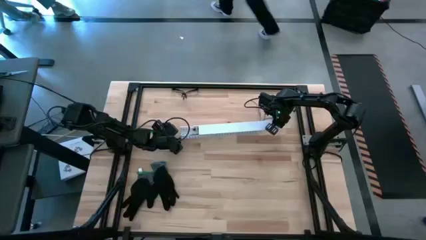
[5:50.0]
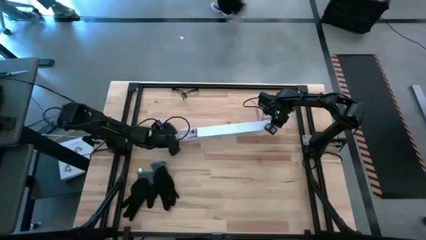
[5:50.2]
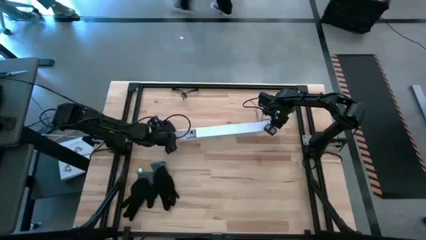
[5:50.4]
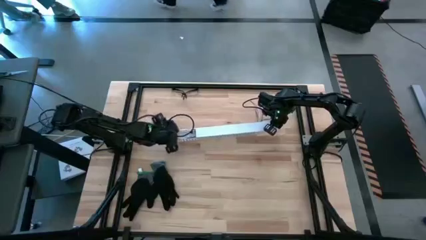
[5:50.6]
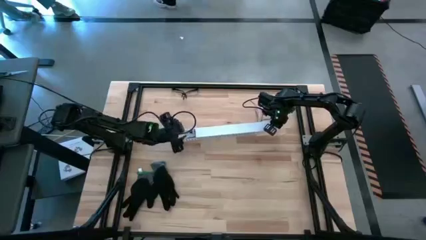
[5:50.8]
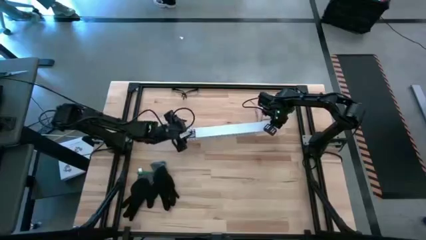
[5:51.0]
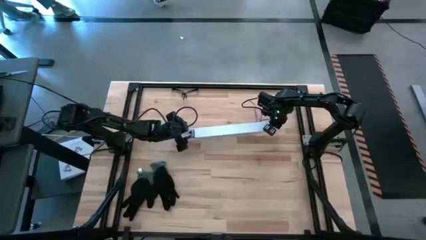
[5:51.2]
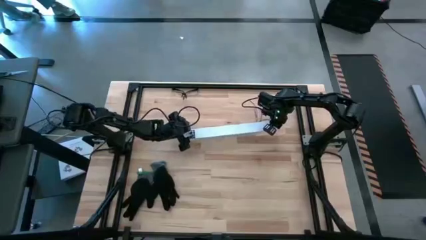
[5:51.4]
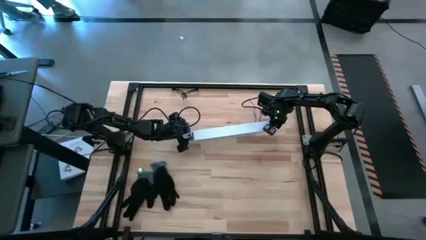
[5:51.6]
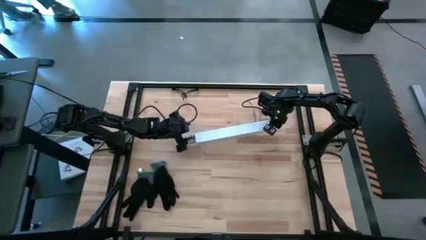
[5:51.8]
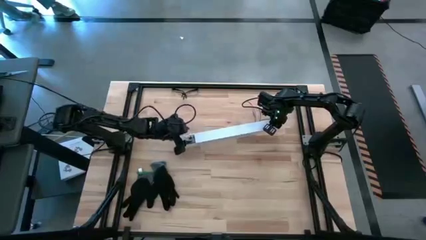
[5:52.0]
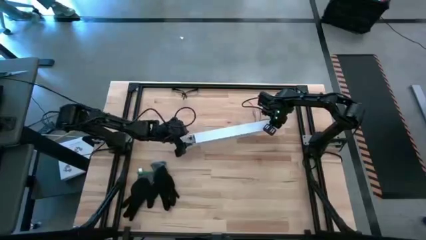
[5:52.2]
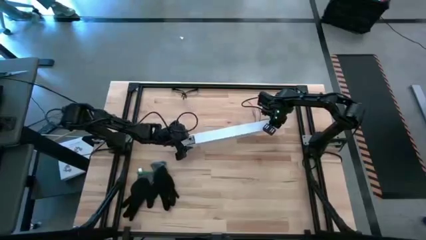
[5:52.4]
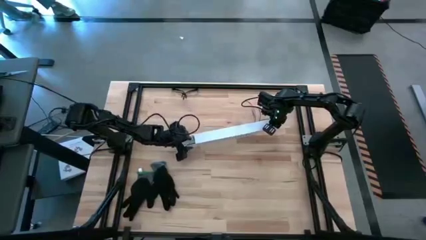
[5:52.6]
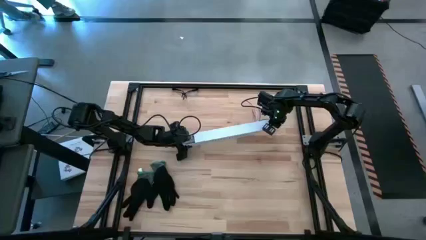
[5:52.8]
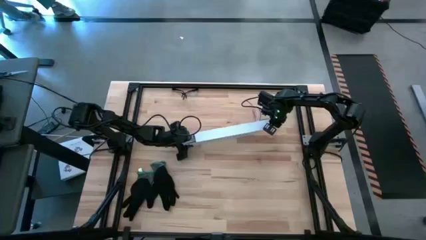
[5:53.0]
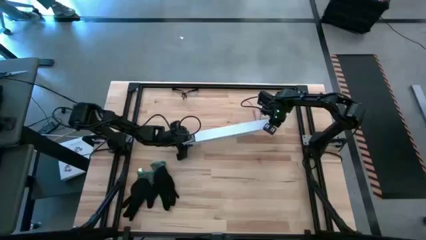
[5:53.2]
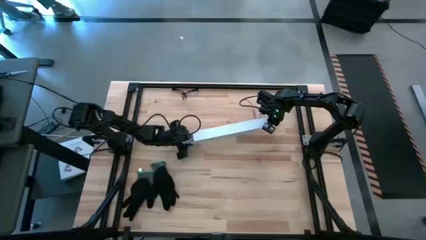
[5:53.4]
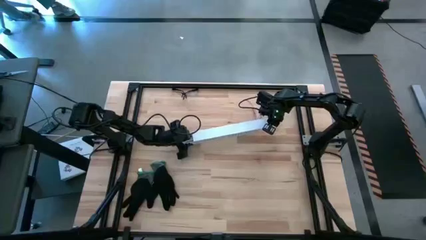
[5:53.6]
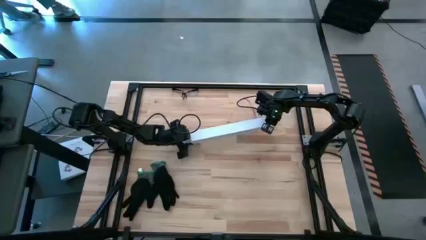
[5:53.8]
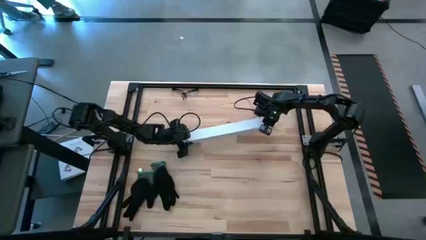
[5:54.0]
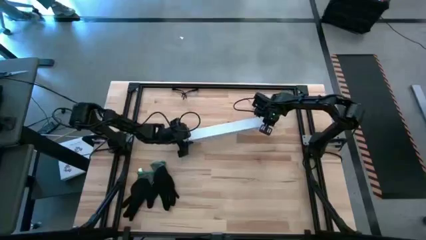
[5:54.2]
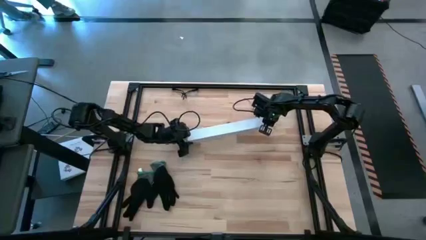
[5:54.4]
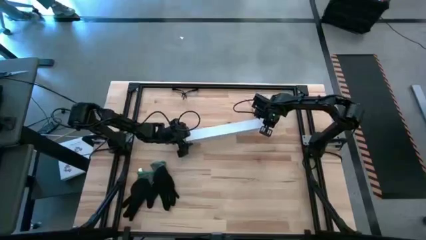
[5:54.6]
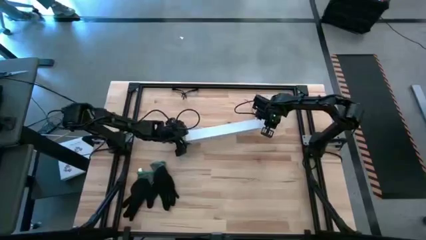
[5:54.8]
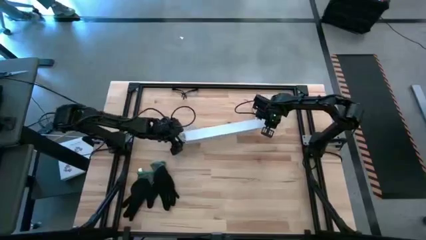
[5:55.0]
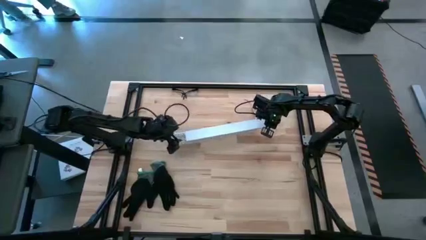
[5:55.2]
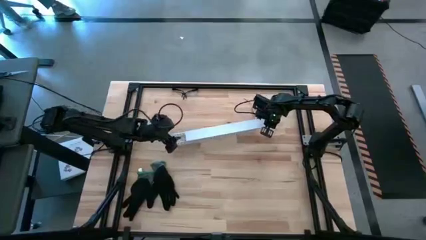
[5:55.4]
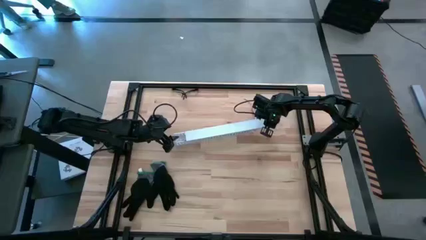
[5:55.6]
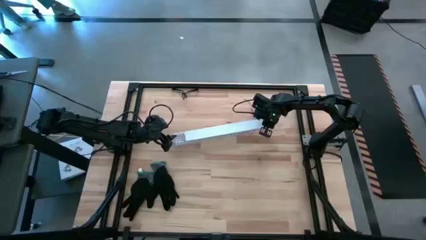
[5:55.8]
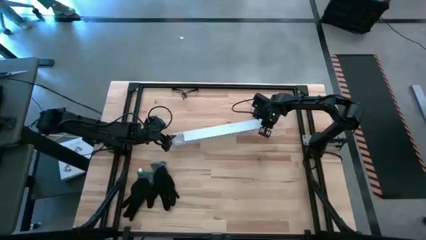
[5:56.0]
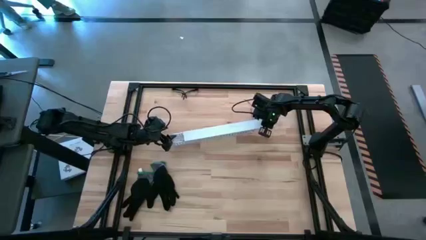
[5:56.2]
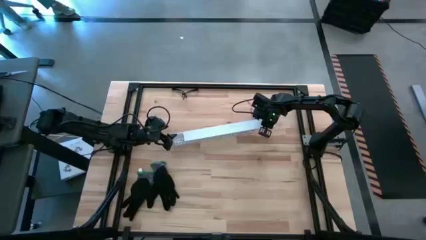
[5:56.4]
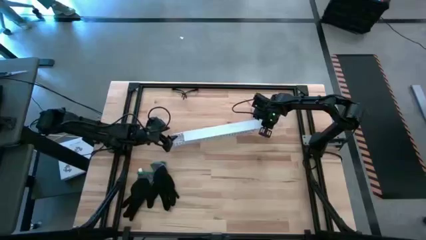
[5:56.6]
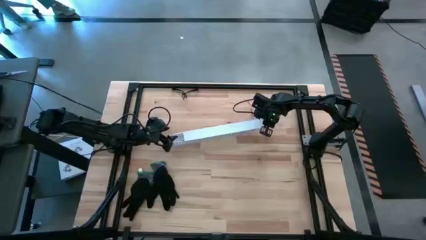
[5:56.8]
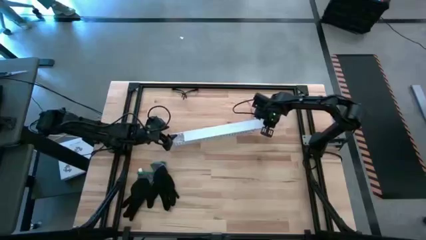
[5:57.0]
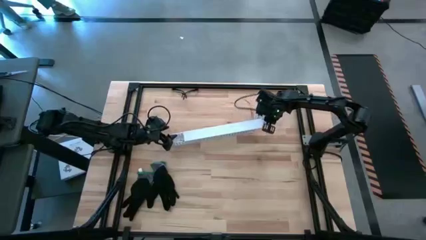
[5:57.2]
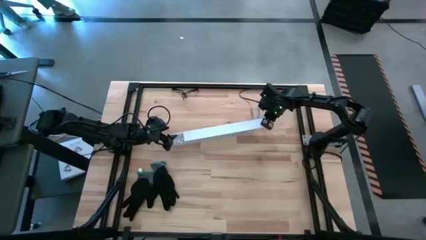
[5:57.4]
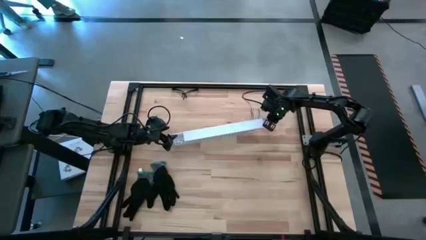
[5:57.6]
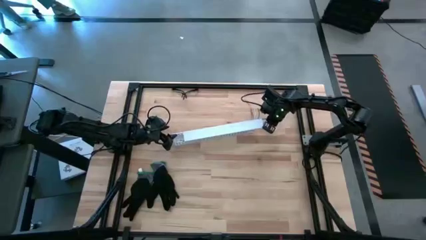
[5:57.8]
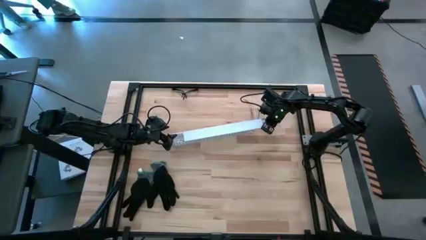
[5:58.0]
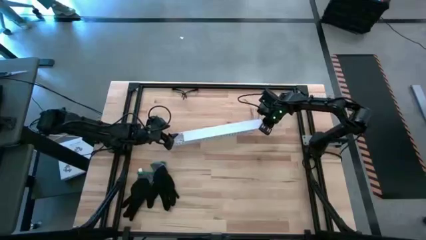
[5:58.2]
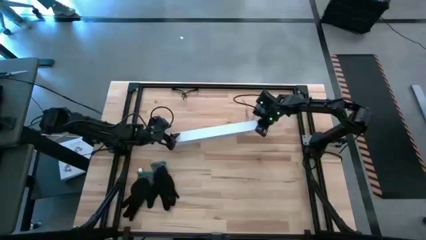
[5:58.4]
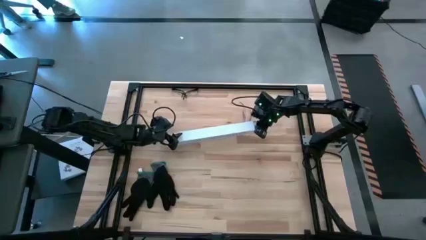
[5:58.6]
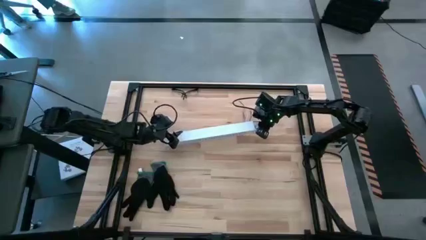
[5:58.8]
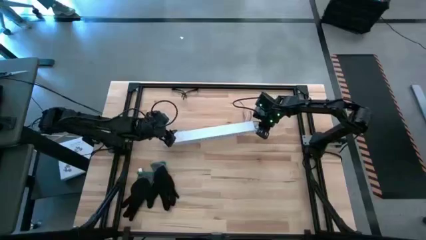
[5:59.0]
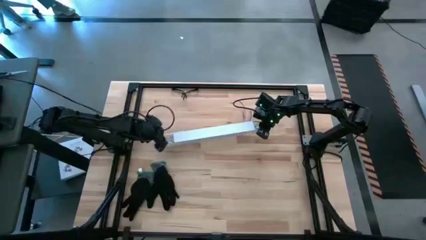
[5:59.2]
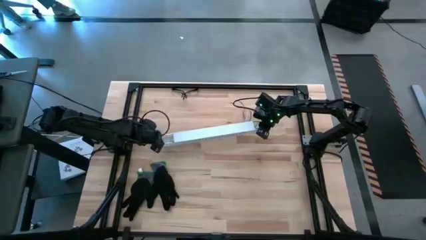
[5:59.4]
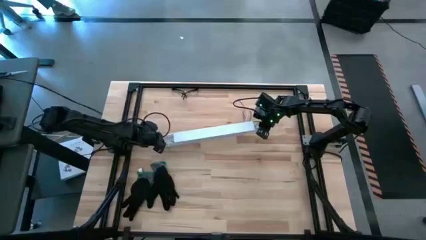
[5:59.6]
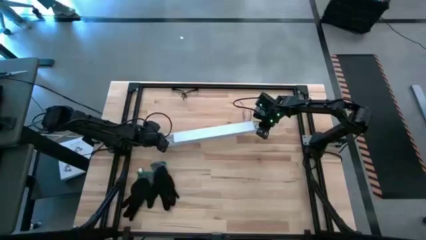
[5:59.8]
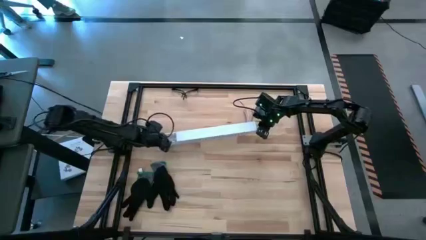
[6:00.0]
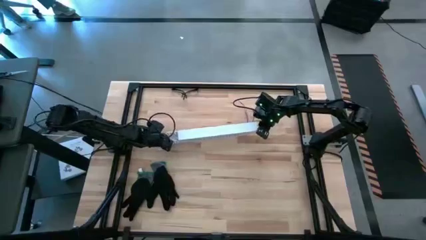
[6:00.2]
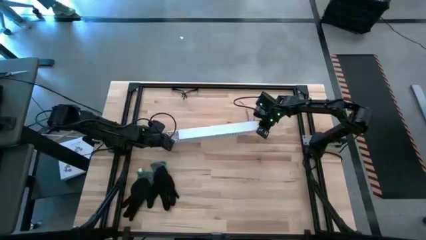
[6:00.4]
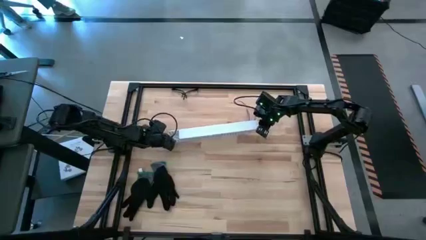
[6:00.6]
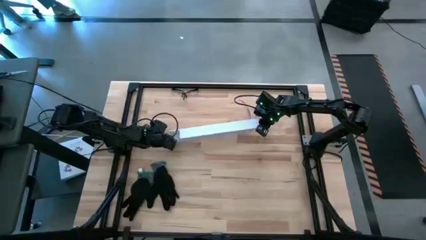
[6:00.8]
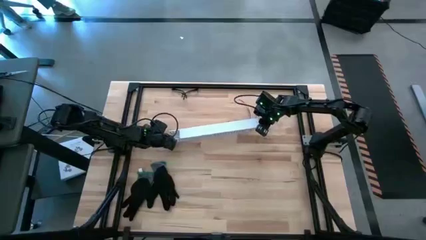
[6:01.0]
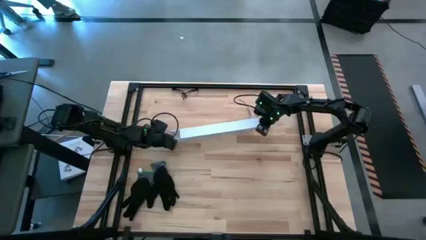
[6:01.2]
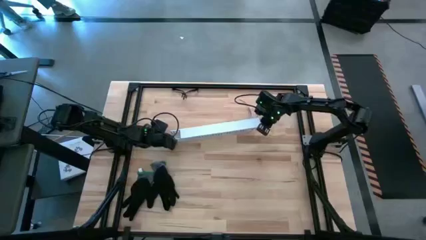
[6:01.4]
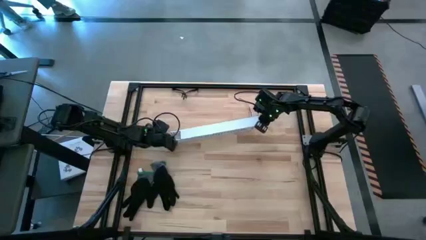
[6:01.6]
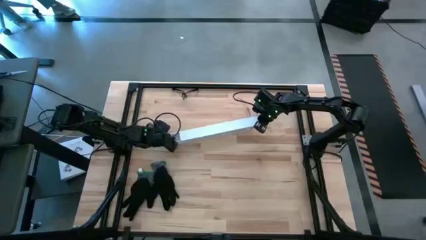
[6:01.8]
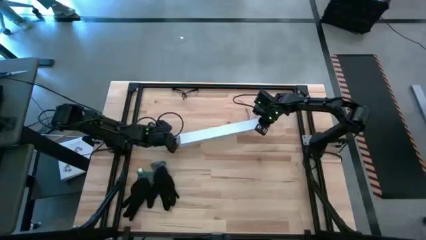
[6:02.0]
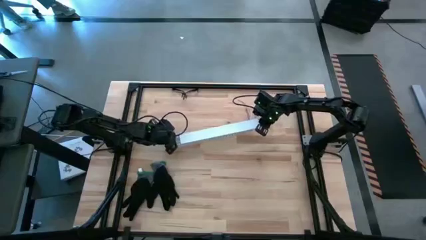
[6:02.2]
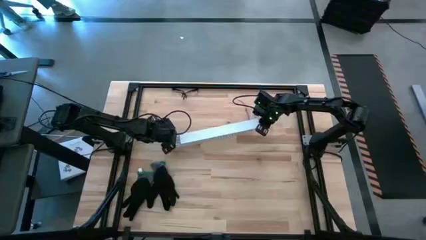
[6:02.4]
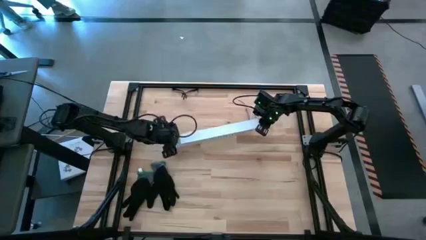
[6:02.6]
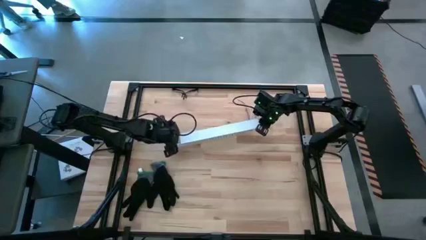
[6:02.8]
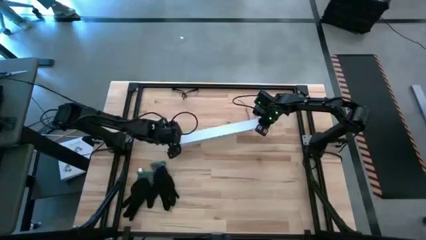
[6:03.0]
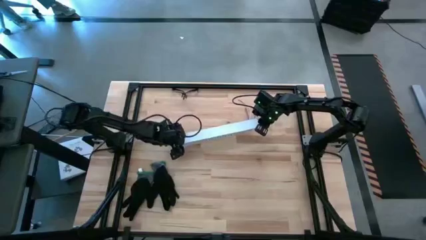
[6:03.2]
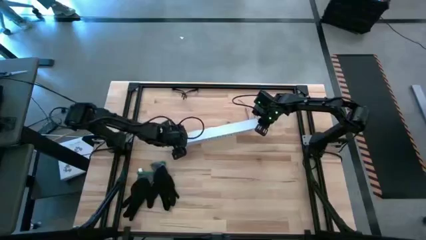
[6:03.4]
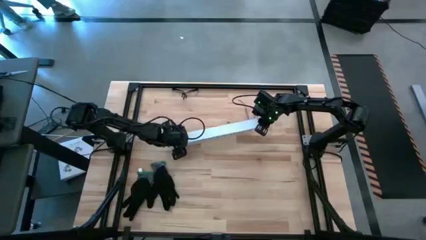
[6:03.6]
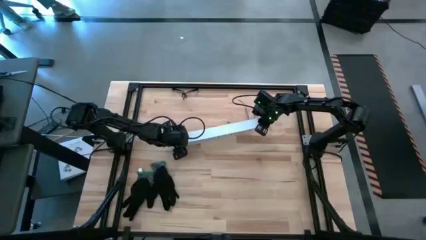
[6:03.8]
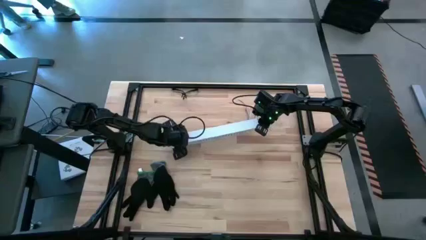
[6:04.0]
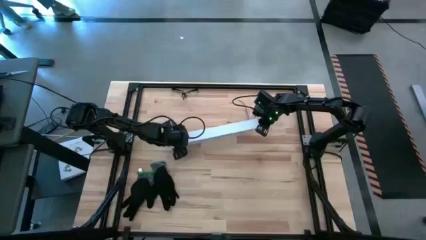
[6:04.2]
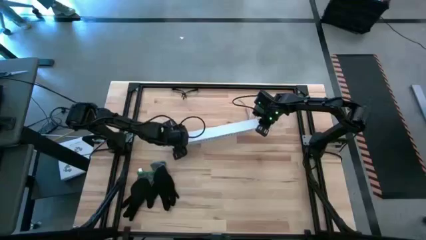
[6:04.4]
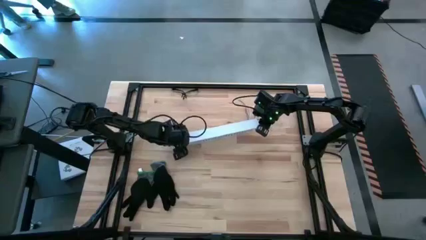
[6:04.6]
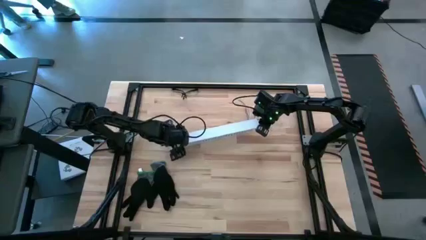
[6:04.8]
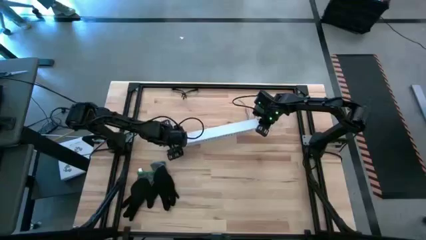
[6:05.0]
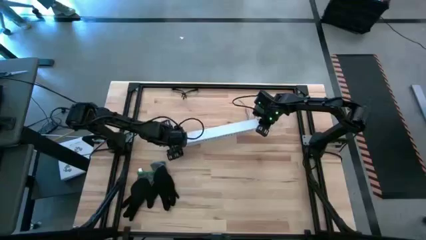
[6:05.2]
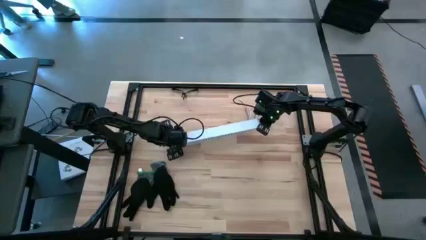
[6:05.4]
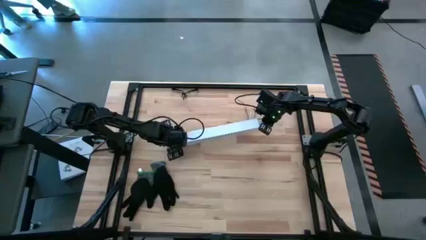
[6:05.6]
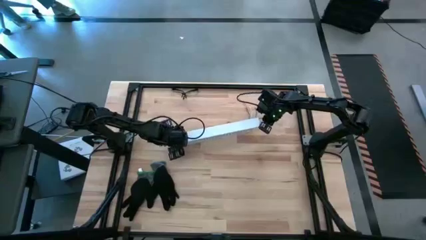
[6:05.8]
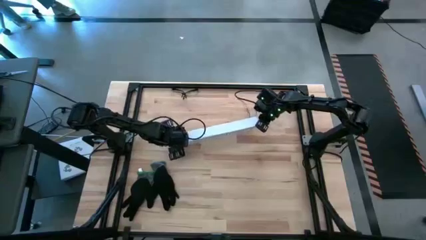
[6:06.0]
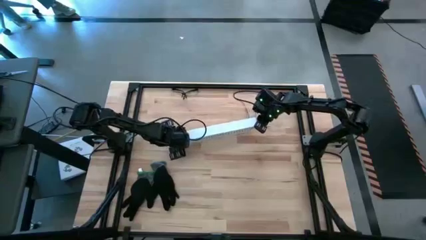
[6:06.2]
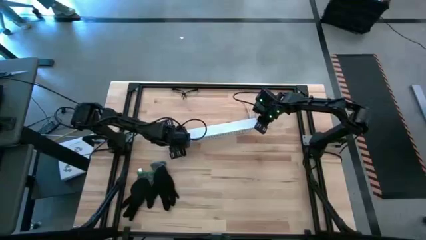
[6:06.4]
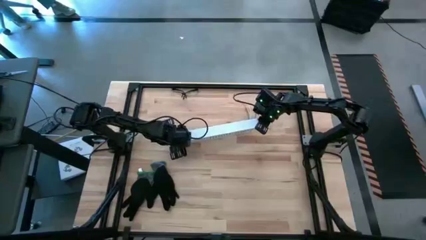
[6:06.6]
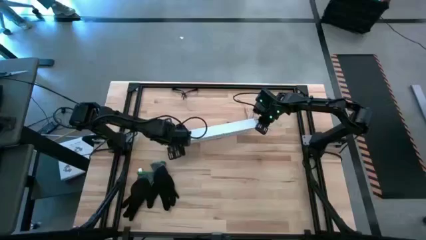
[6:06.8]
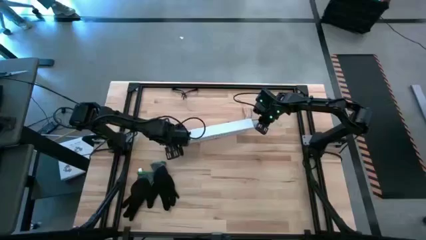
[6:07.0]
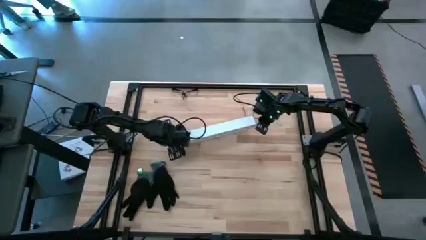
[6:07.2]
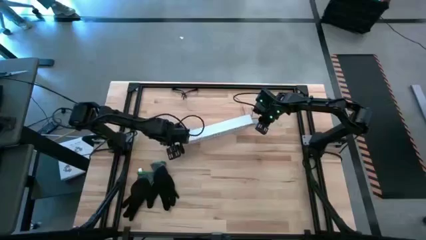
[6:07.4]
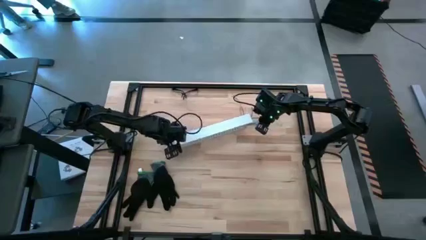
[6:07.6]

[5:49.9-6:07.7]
Task: Ziptie cables
Close the white cable duct
